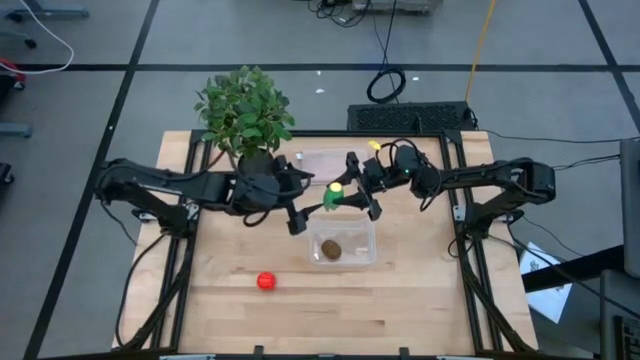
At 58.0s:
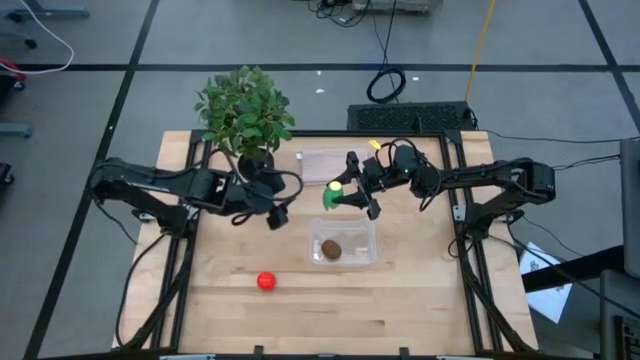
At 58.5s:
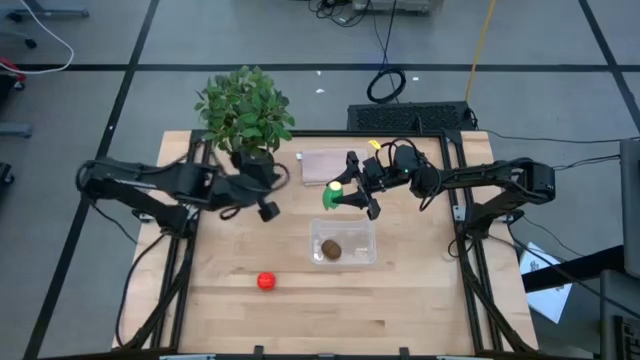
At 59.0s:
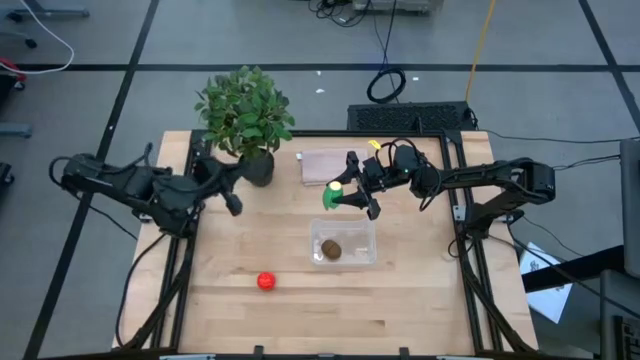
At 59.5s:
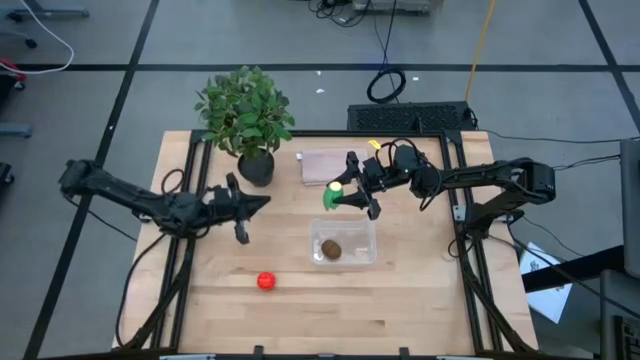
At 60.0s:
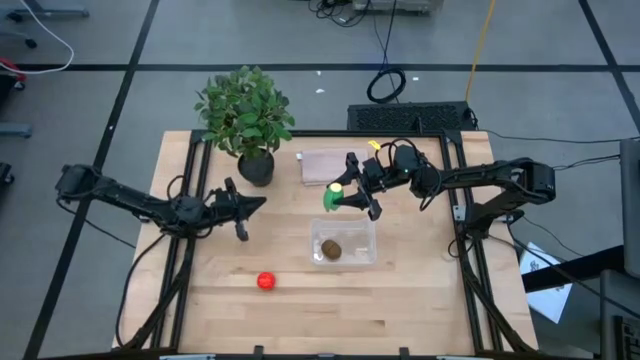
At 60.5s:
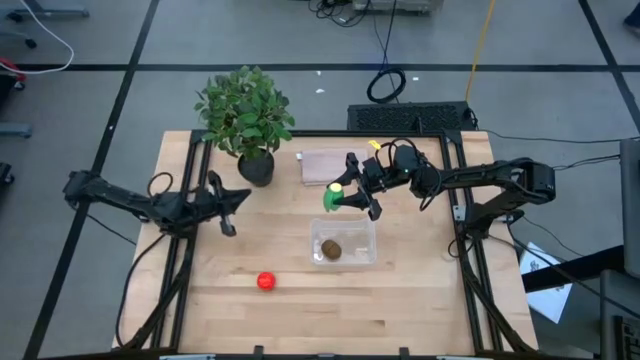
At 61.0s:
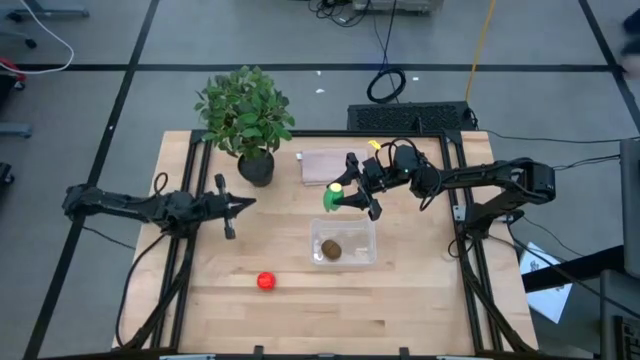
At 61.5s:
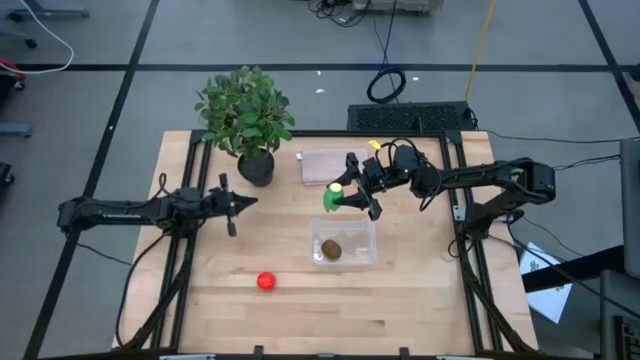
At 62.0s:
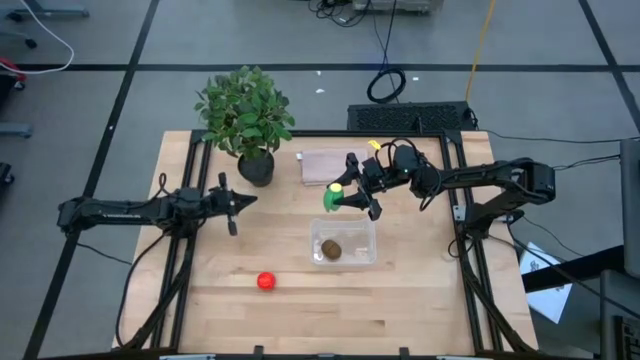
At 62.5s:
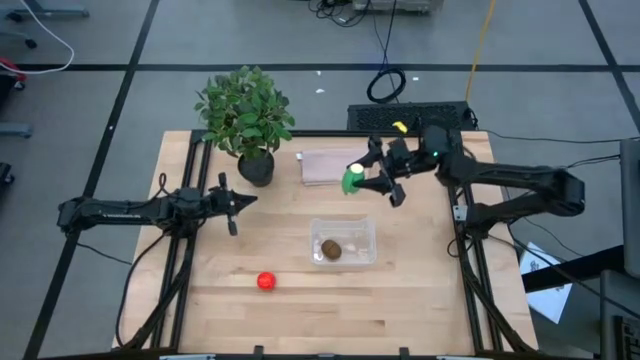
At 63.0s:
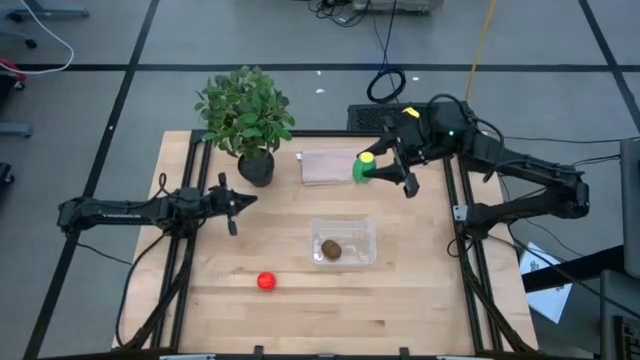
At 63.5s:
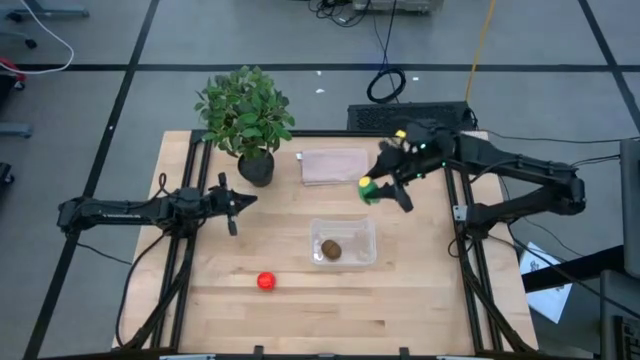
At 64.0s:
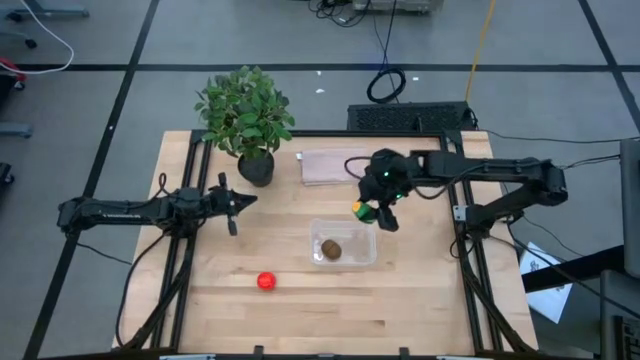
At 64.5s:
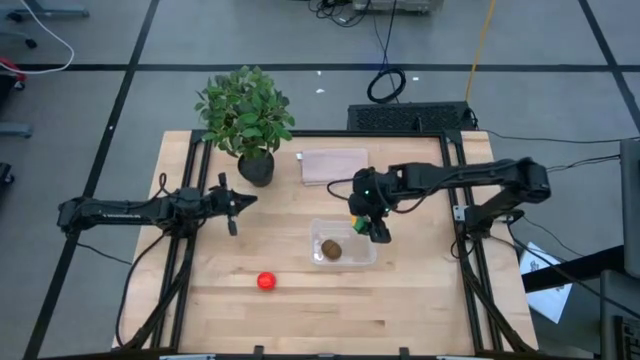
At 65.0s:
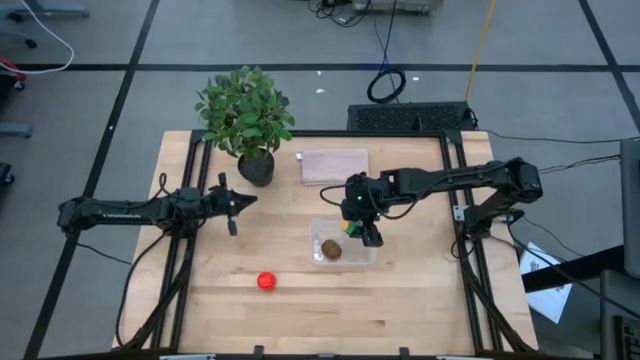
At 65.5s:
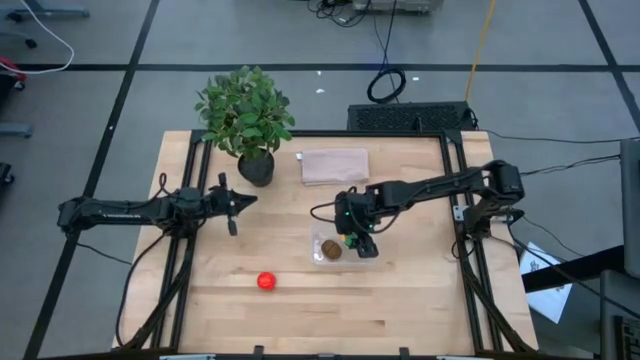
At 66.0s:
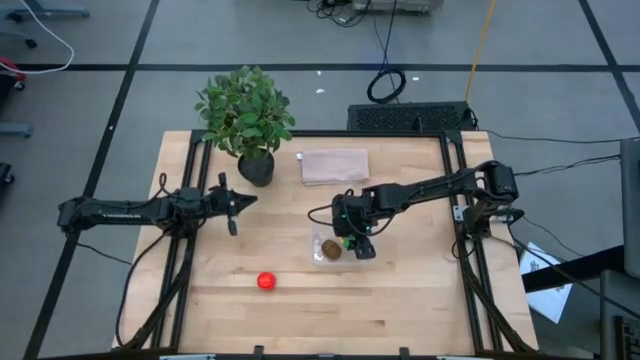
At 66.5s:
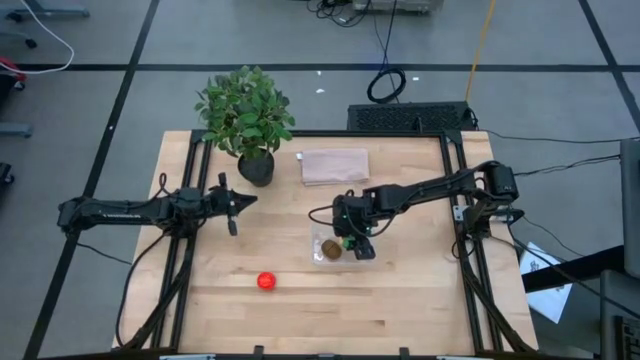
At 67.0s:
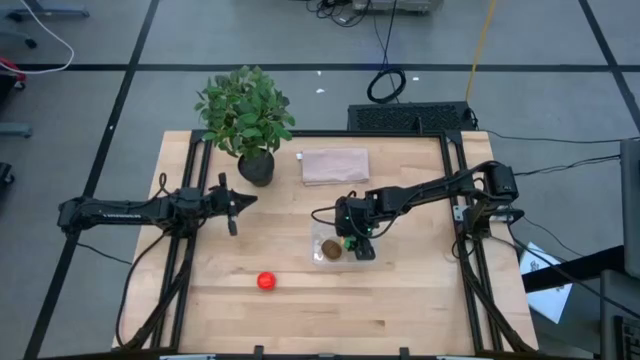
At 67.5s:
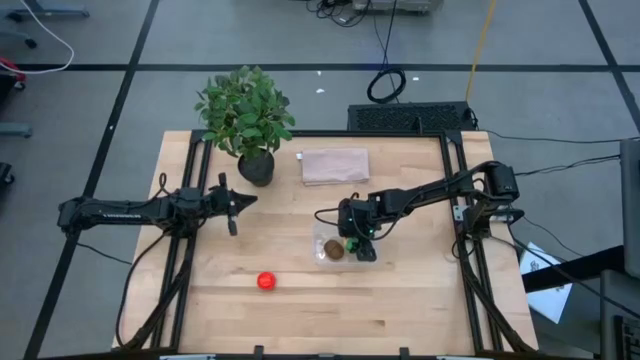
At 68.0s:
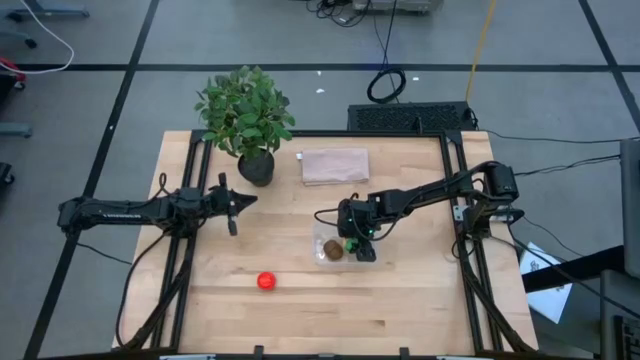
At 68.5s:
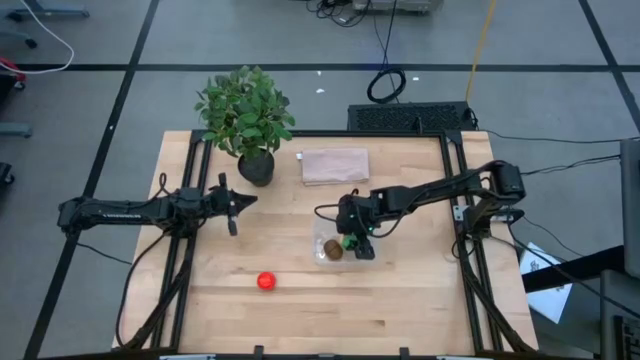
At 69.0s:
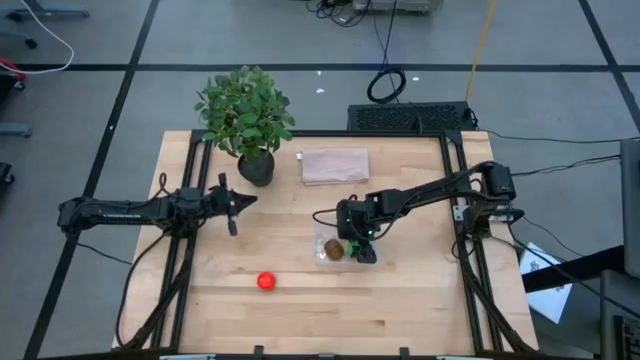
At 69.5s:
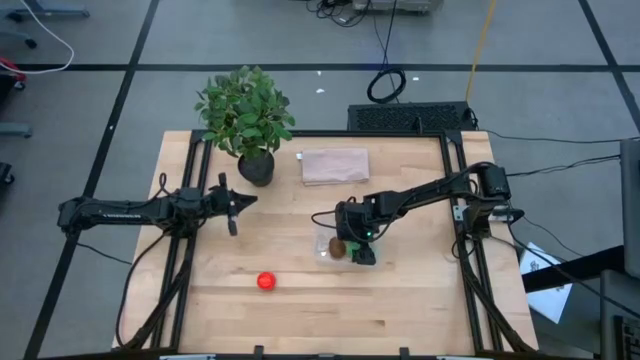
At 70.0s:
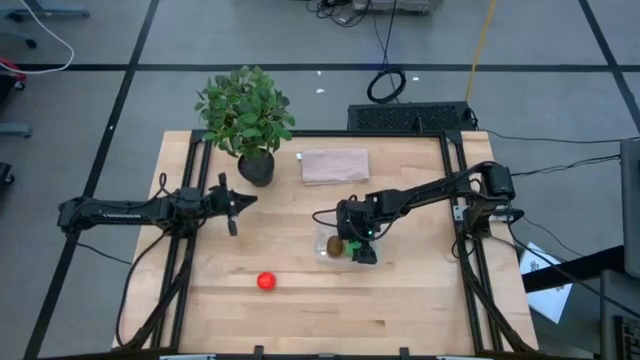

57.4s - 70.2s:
Task: Pick and placing Produce into tupperware
Put the green corn into the transparent bin

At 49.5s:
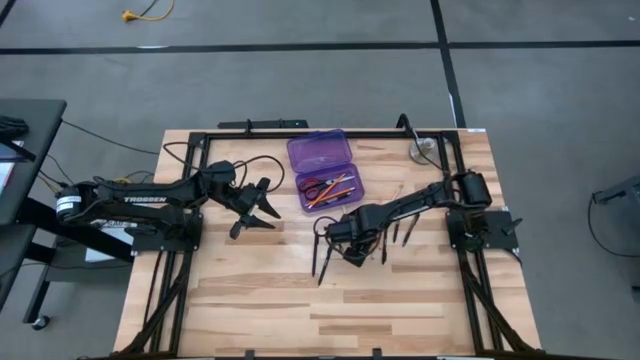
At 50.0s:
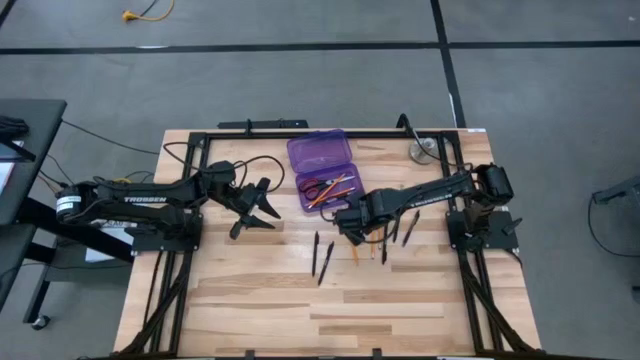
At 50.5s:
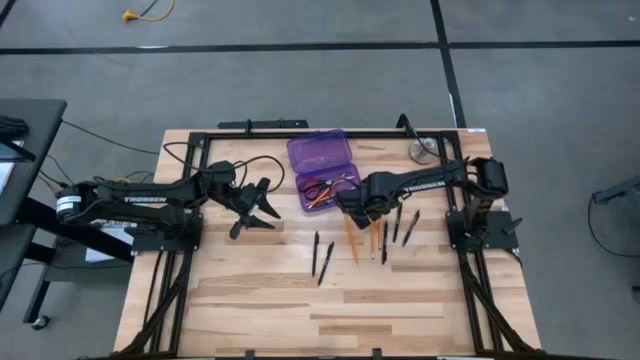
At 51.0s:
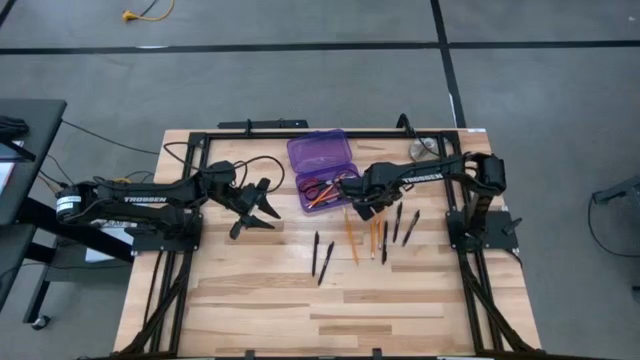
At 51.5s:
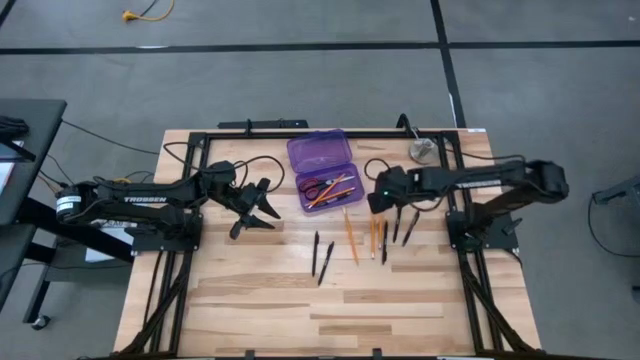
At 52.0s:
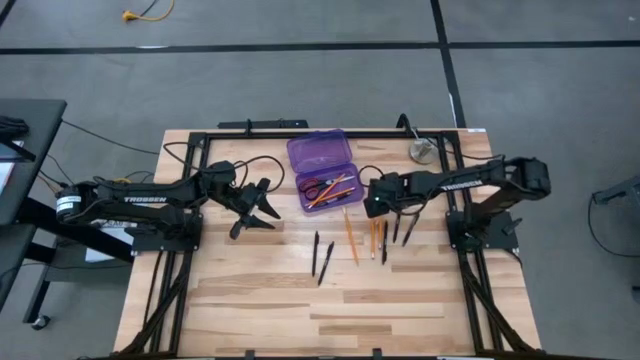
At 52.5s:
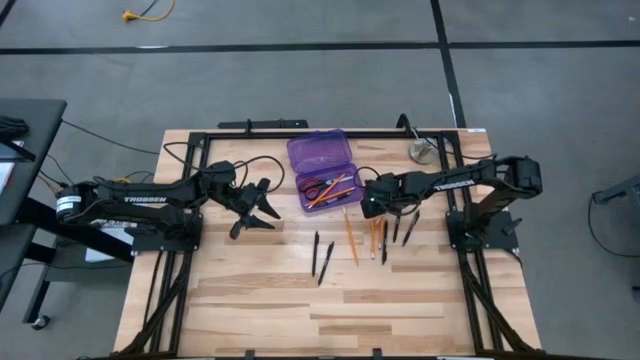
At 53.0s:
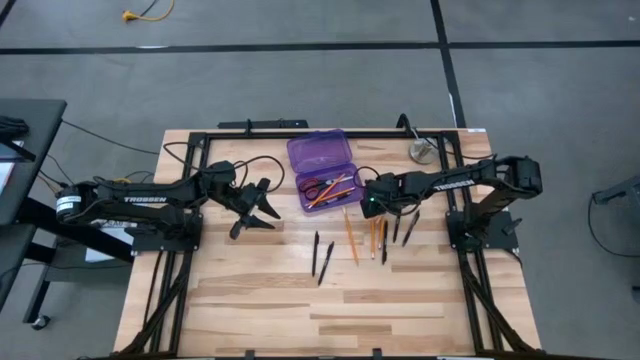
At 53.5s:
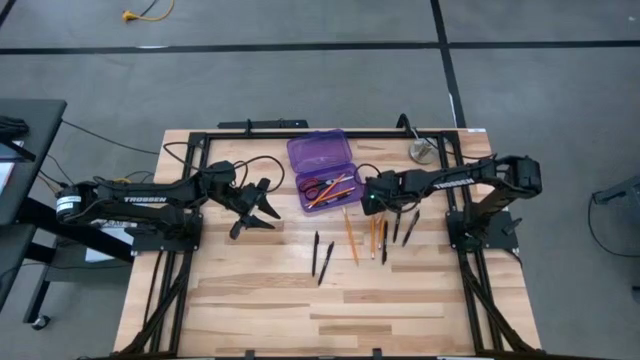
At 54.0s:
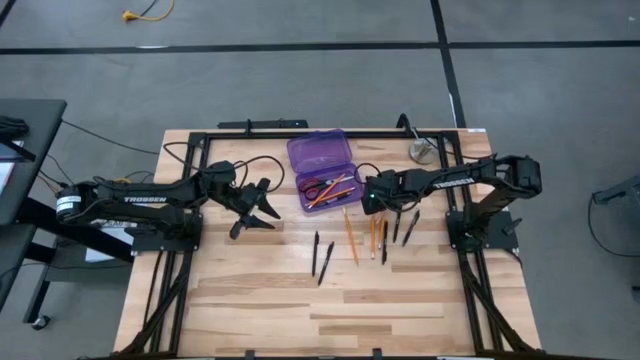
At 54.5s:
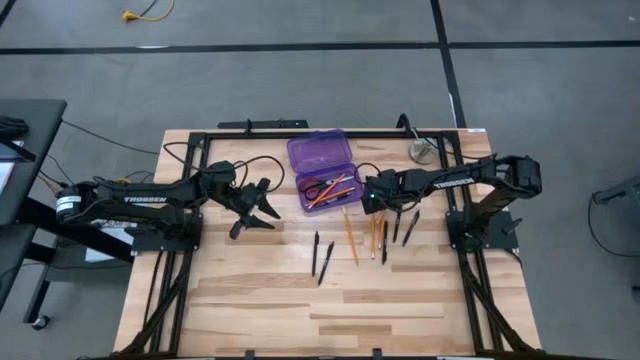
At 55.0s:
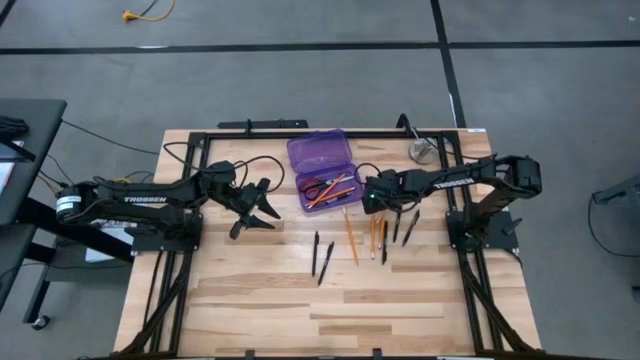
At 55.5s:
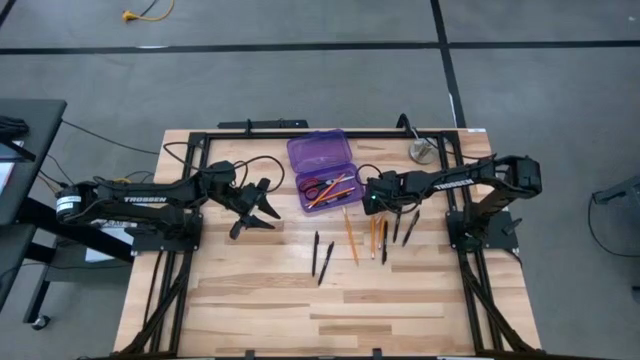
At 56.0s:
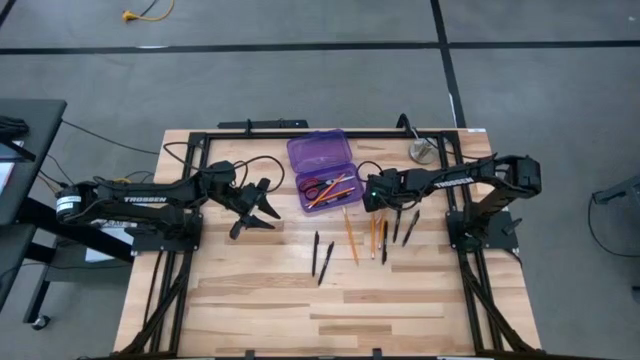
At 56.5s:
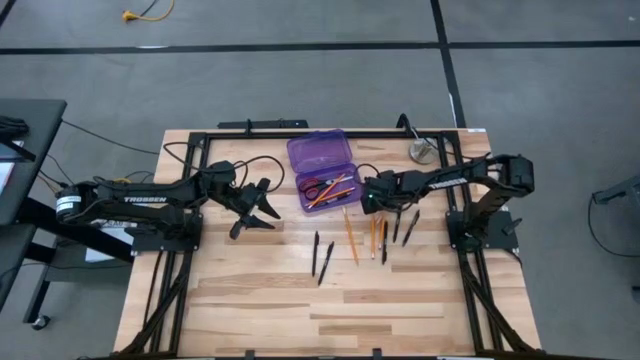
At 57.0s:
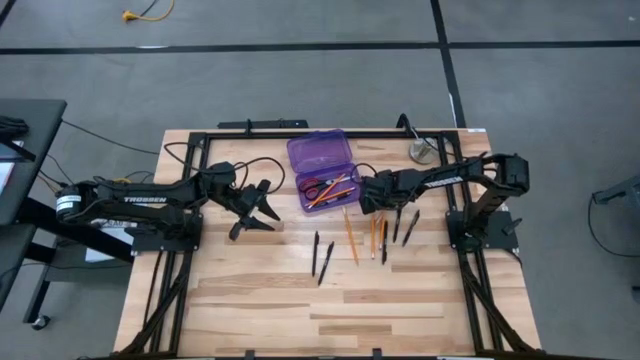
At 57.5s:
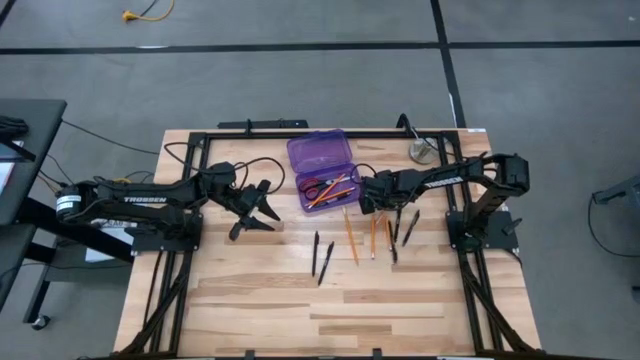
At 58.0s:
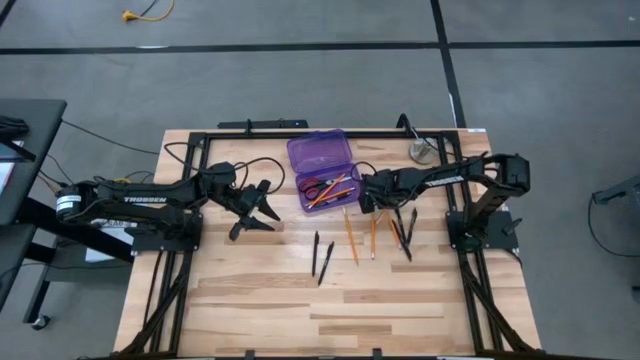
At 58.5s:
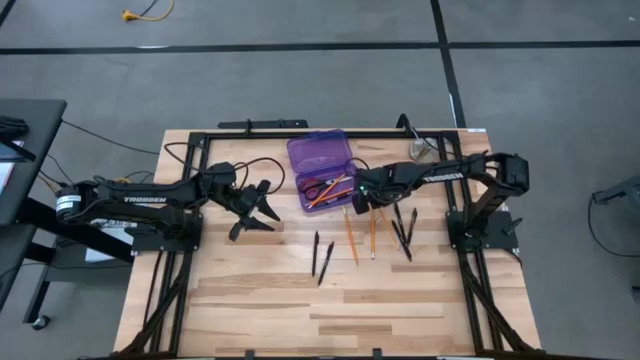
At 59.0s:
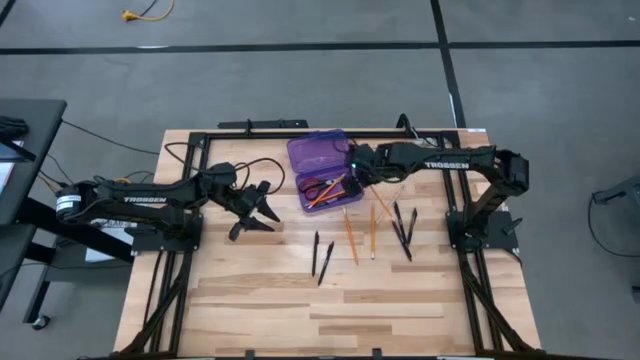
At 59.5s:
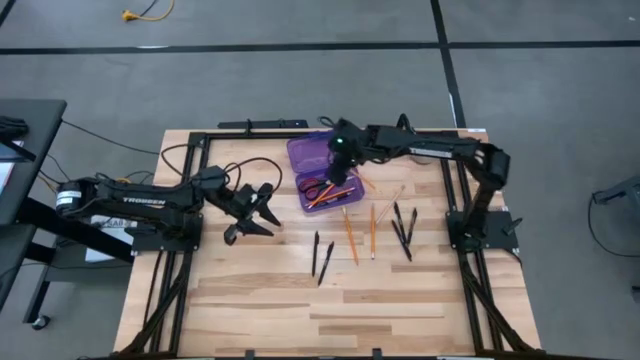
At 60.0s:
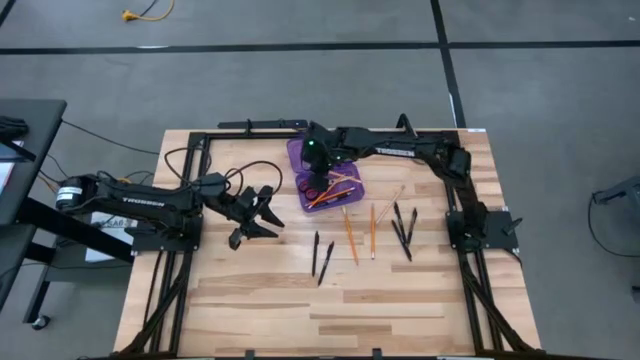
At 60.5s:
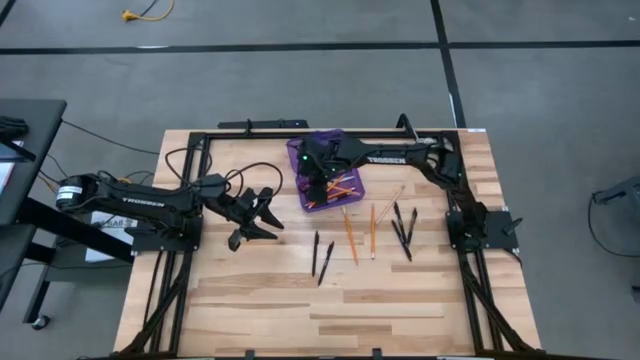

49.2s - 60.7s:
Task: Pick & place school supplies into a supply box
Put the yellow pencil into the purple supply box
